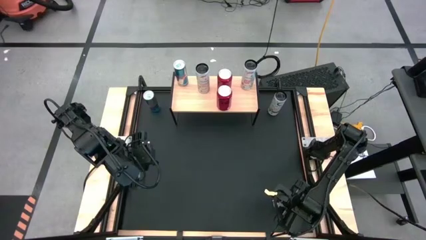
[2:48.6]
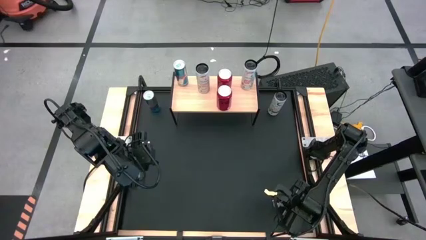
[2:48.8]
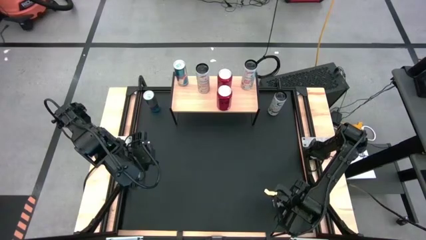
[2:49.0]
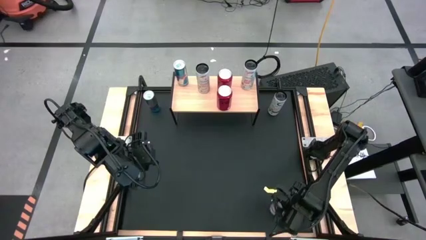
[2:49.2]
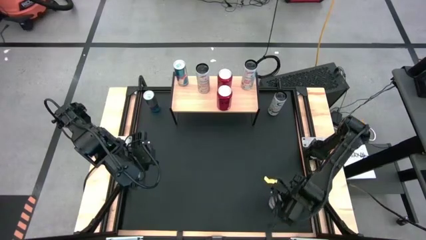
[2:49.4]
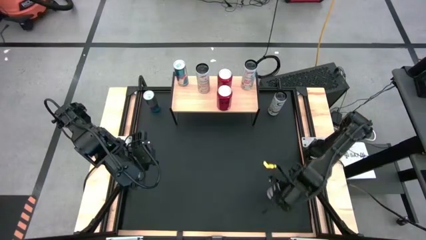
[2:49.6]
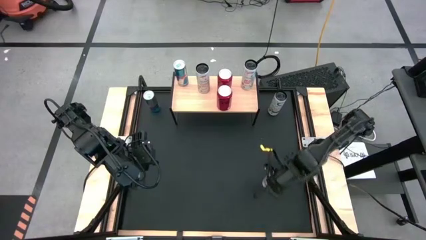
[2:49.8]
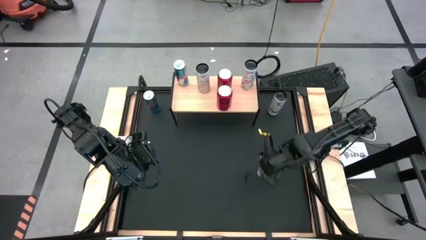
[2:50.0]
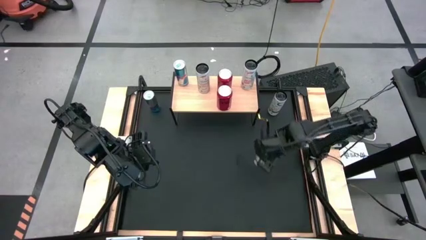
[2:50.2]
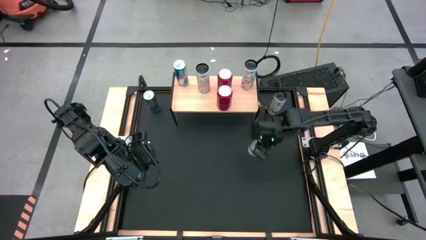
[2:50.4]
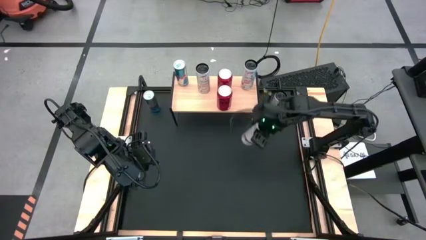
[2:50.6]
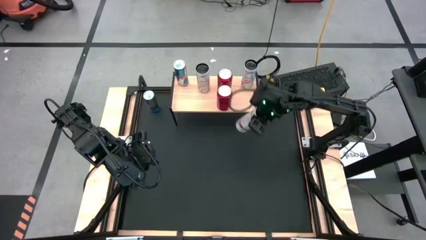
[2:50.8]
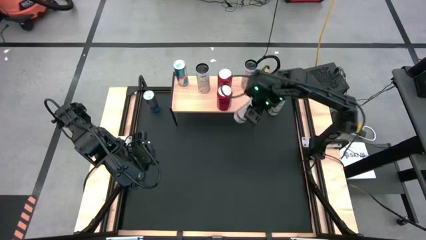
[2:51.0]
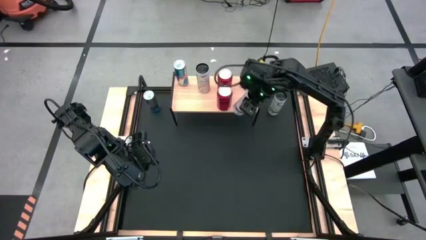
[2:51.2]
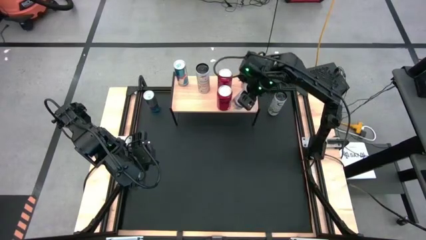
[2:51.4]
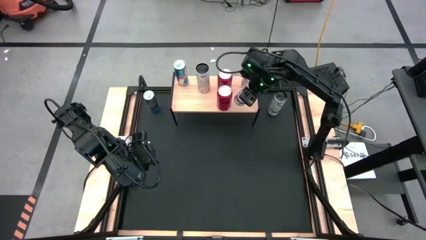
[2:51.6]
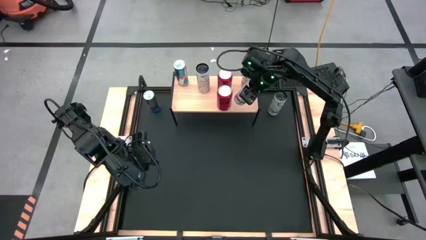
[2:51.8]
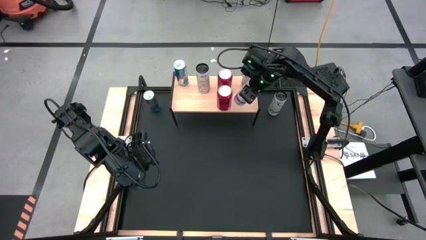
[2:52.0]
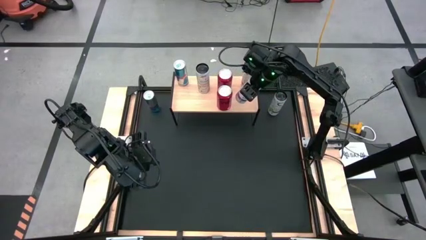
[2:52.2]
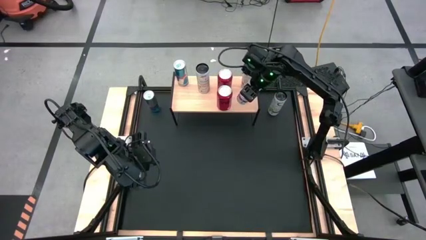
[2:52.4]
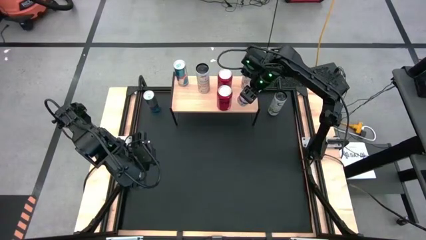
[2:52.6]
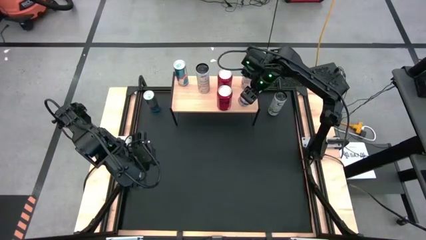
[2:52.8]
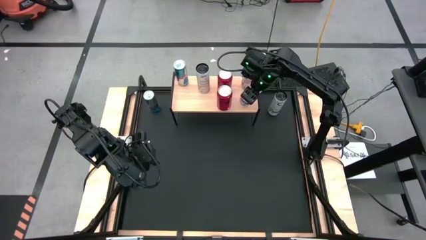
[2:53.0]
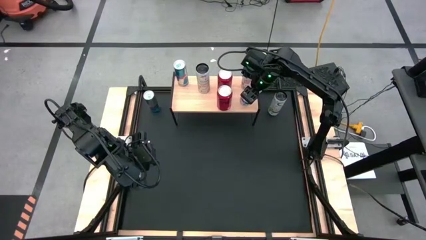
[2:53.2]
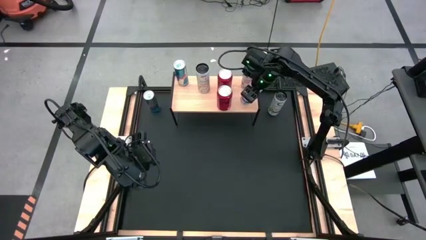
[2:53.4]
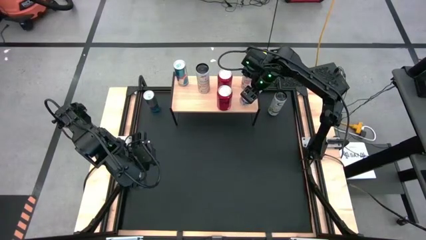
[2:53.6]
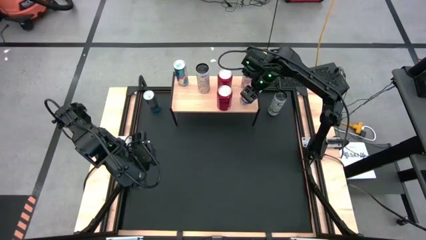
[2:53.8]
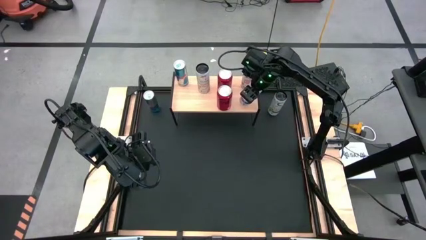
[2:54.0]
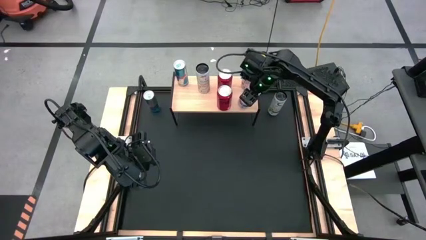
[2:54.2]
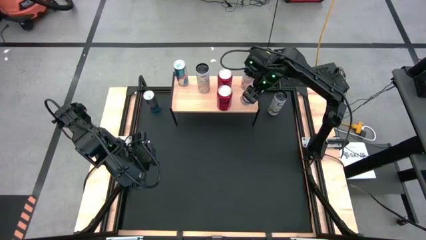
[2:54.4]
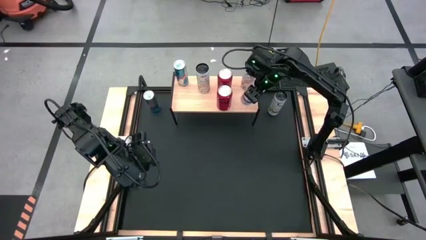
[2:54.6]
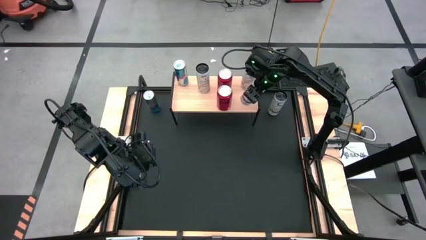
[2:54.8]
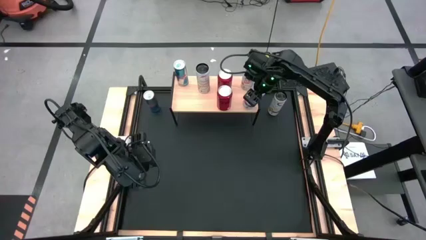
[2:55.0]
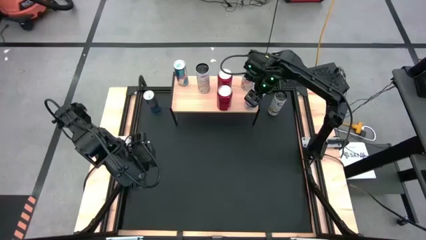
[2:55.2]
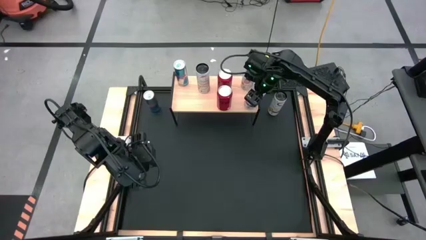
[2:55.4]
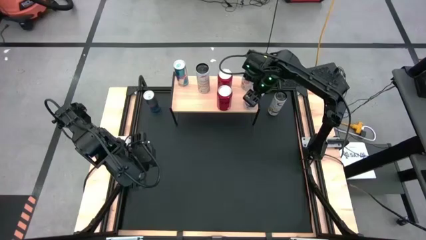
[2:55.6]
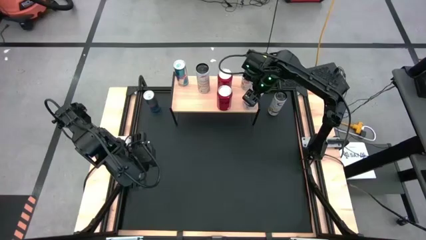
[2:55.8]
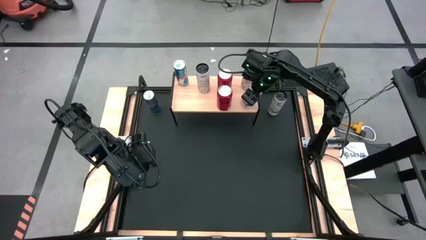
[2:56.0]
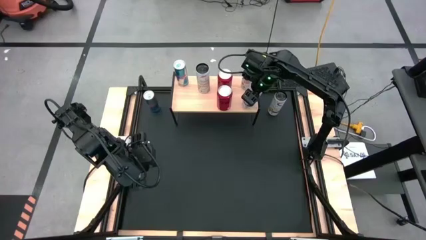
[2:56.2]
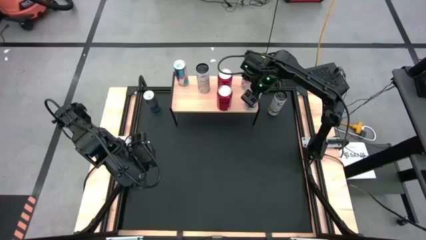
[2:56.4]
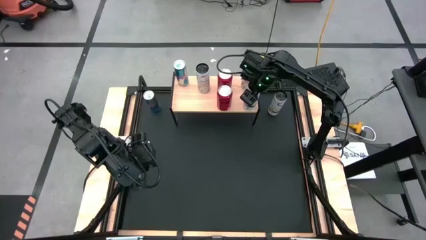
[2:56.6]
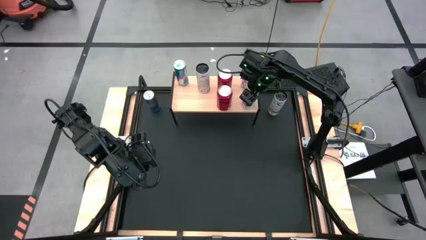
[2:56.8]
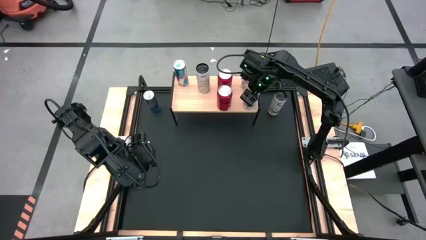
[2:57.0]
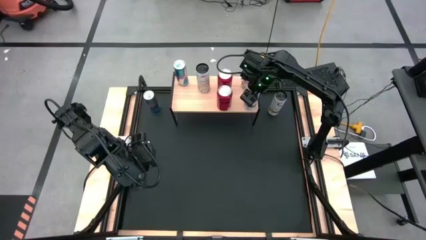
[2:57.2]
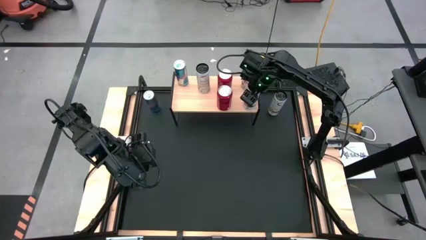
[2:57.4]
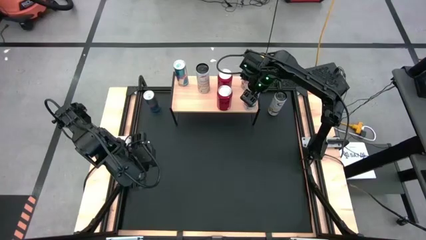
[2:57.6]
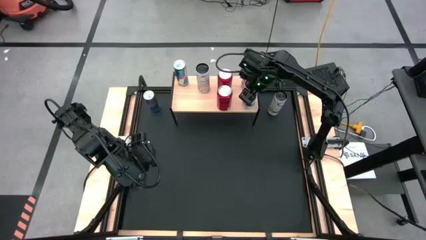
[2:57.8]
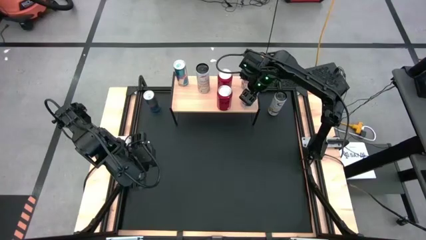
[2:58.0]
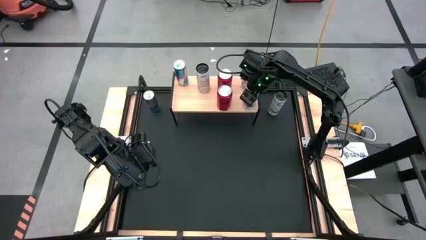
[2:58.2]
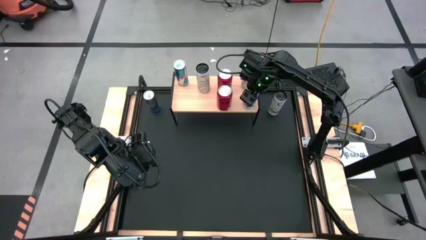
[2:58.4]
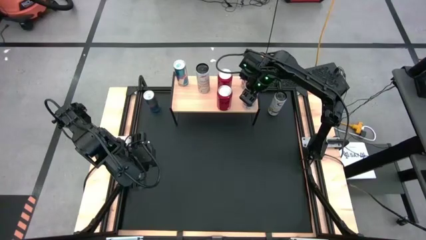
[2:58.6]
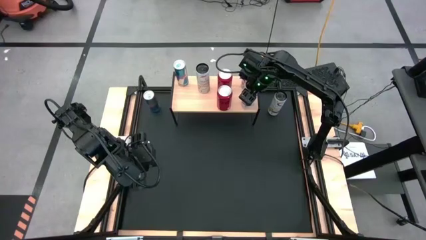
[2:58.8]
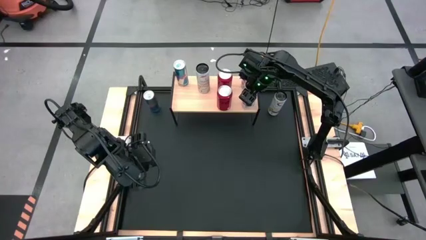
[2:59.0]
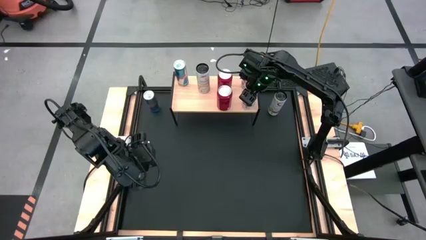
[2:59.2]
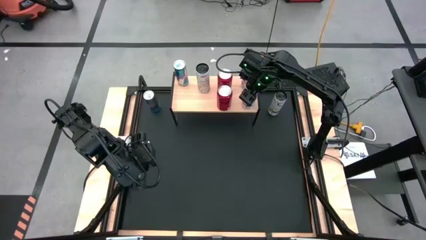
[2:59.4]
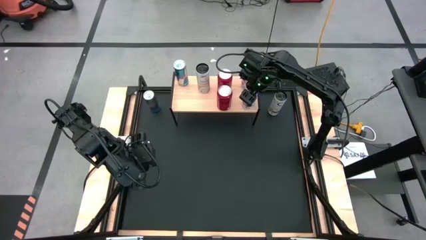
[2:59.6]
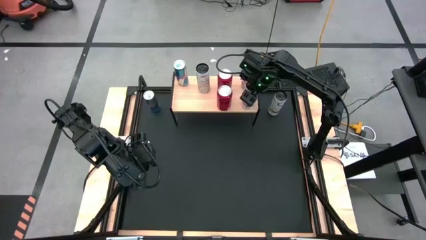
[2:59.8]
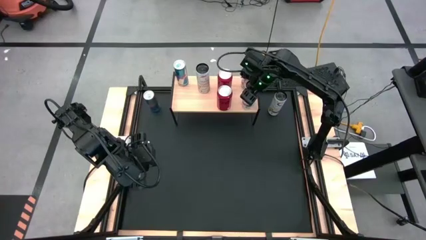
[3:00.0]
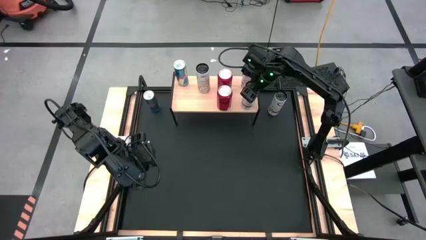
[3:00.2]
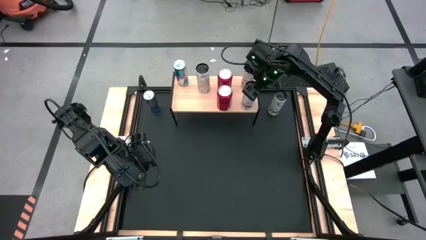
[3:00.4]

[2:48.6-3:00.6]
Task: Place canned beverage on shelf
Put the white pink soda can on the shelf aligned with the other white pink soda can
